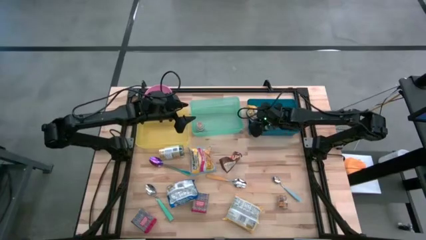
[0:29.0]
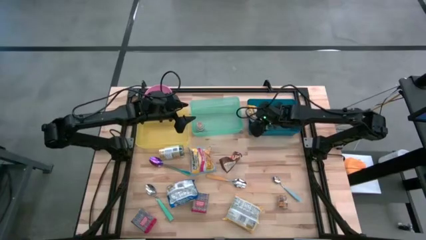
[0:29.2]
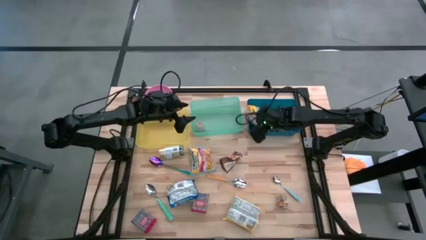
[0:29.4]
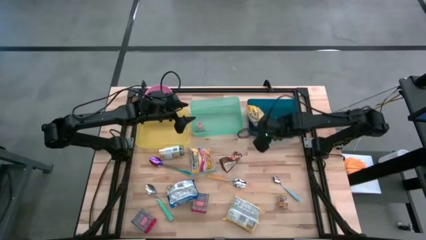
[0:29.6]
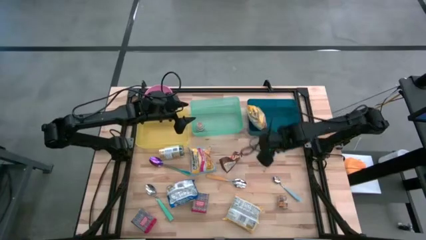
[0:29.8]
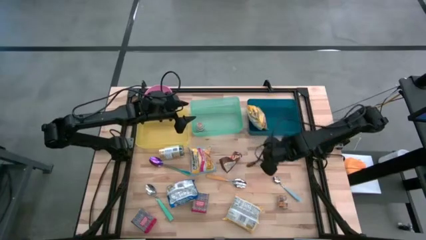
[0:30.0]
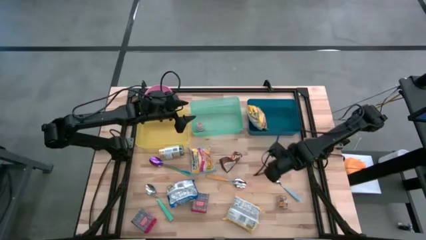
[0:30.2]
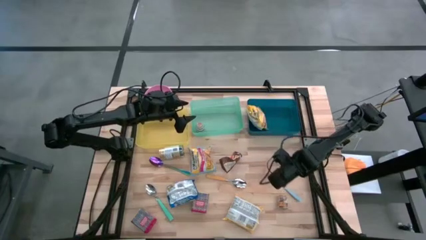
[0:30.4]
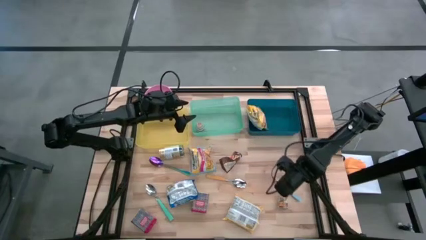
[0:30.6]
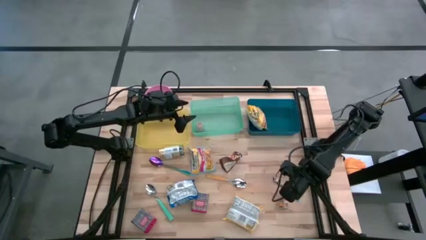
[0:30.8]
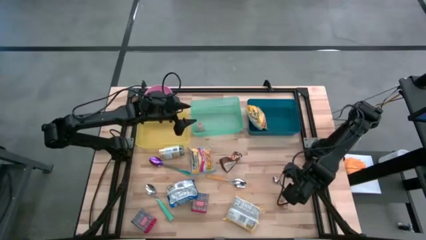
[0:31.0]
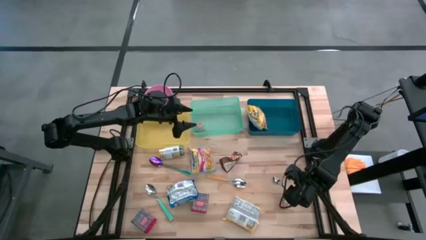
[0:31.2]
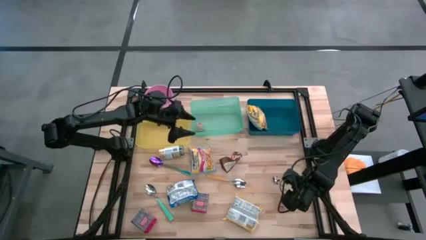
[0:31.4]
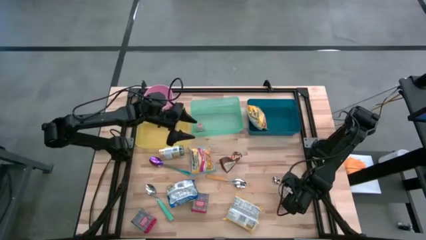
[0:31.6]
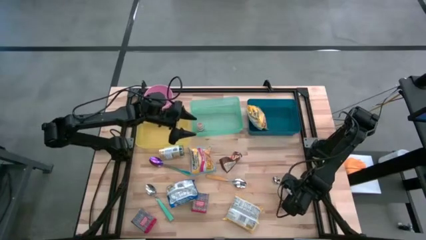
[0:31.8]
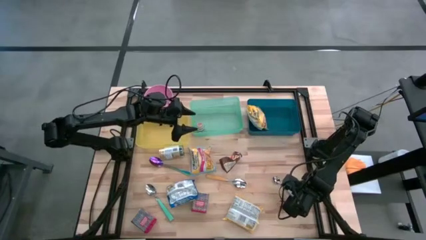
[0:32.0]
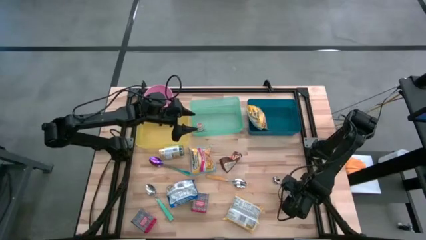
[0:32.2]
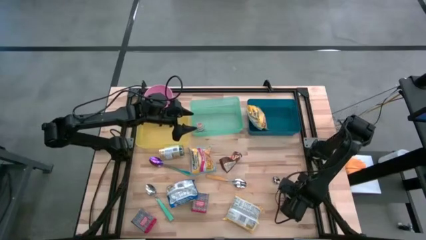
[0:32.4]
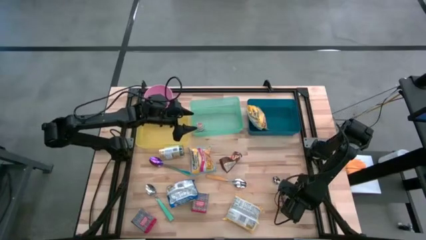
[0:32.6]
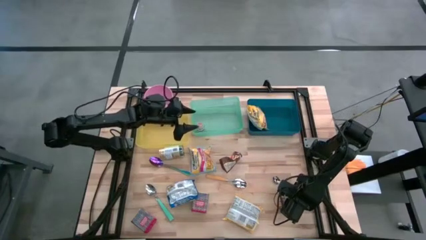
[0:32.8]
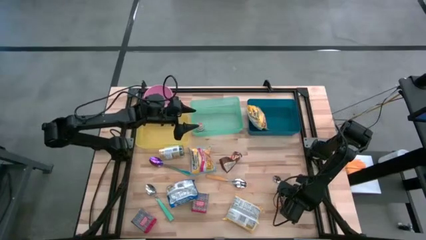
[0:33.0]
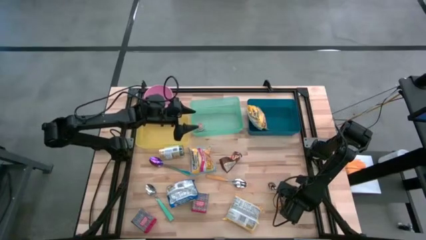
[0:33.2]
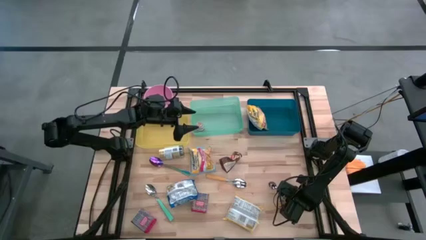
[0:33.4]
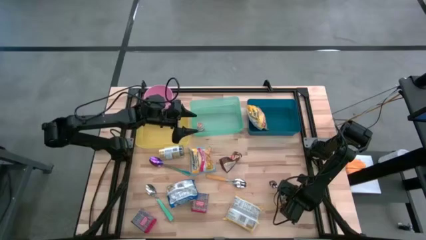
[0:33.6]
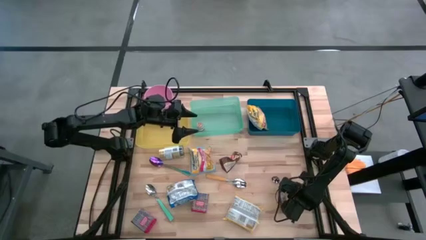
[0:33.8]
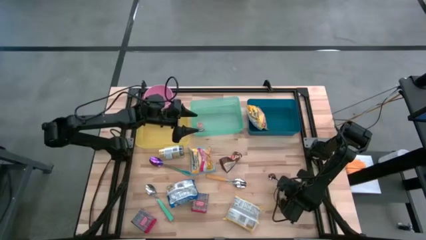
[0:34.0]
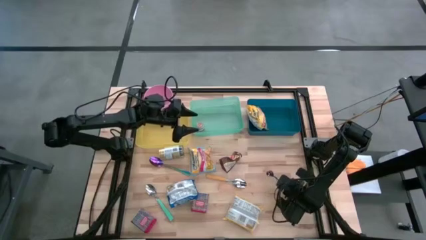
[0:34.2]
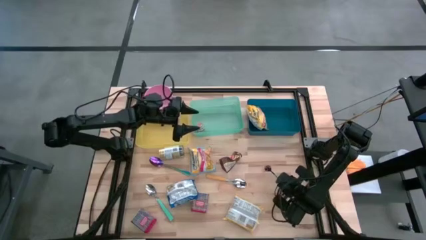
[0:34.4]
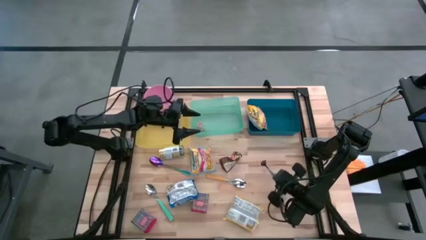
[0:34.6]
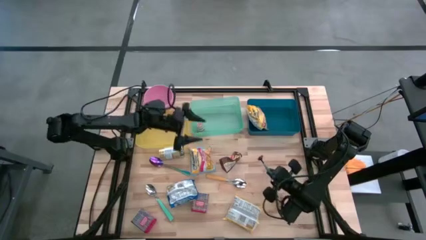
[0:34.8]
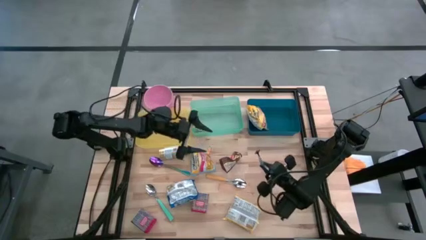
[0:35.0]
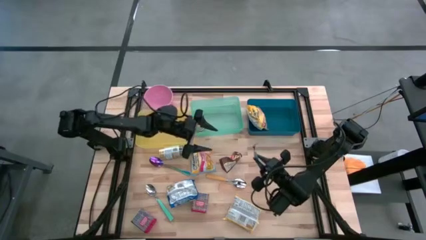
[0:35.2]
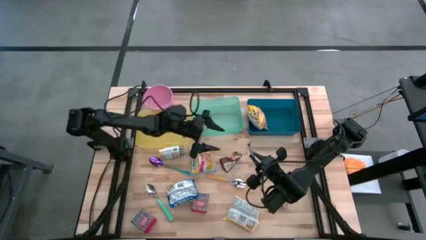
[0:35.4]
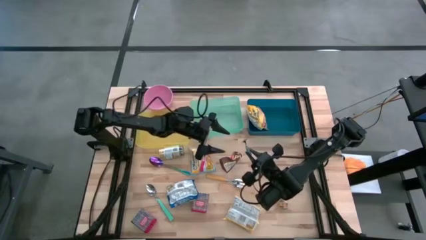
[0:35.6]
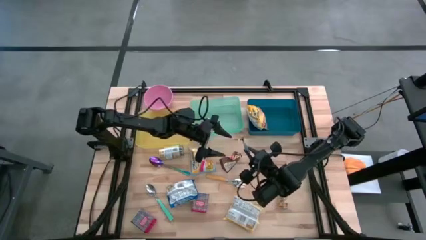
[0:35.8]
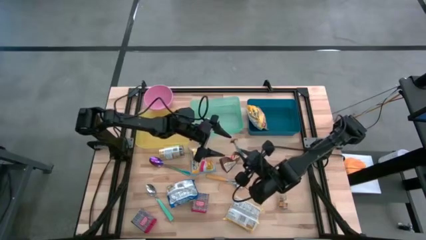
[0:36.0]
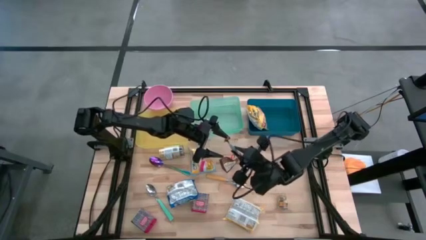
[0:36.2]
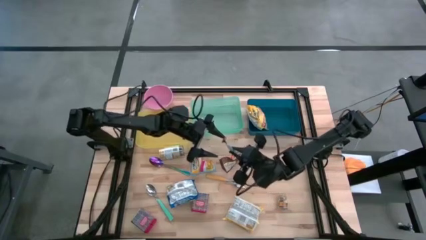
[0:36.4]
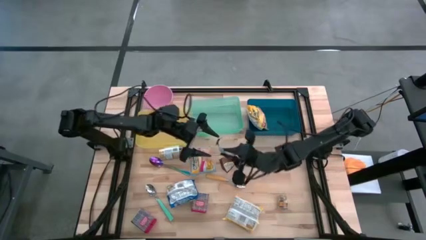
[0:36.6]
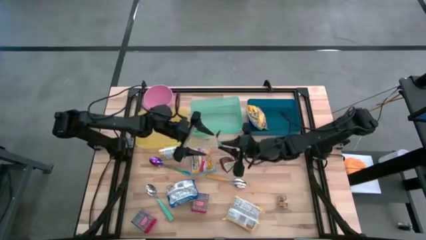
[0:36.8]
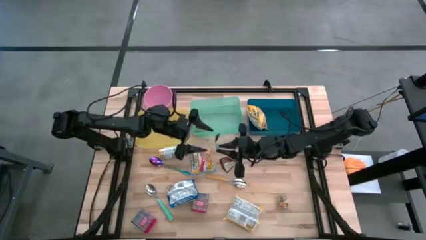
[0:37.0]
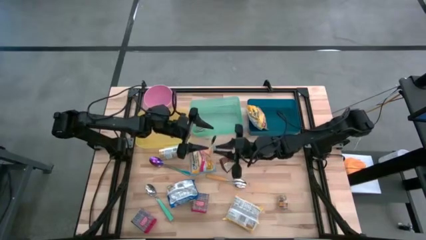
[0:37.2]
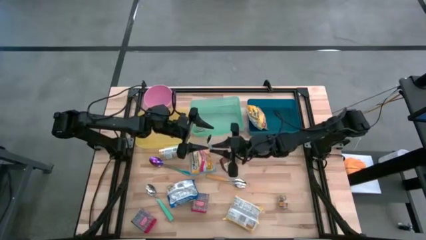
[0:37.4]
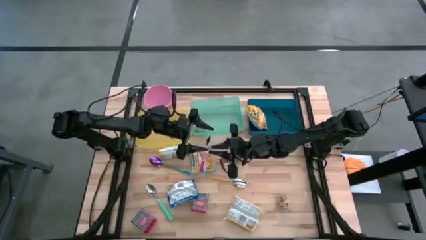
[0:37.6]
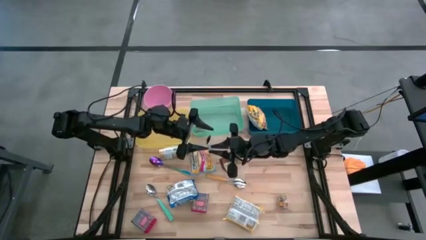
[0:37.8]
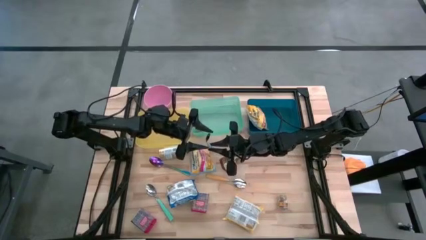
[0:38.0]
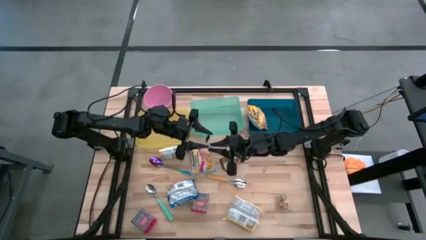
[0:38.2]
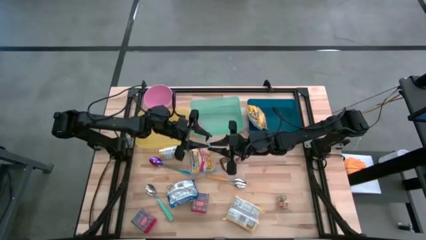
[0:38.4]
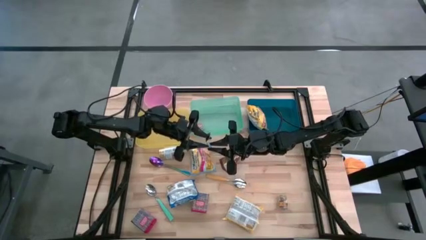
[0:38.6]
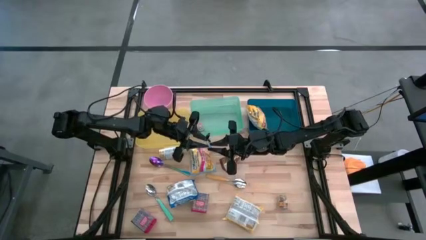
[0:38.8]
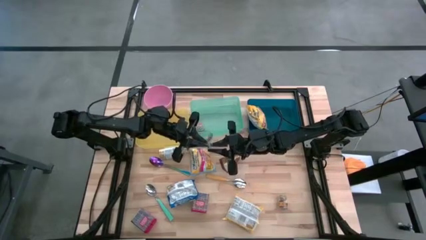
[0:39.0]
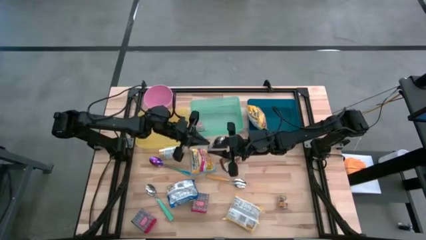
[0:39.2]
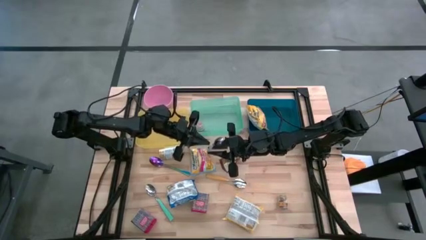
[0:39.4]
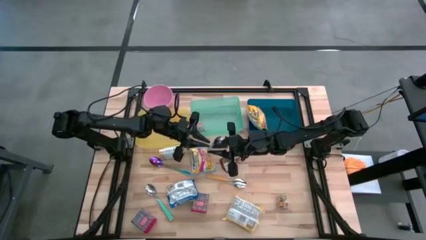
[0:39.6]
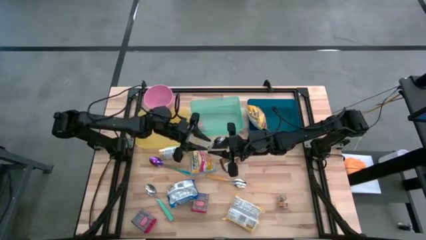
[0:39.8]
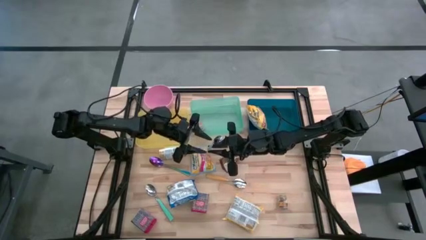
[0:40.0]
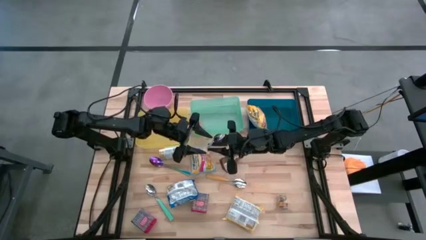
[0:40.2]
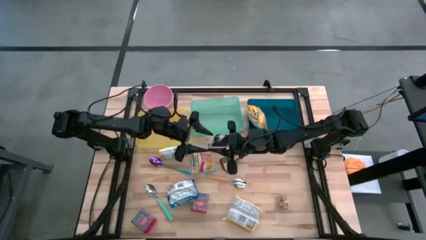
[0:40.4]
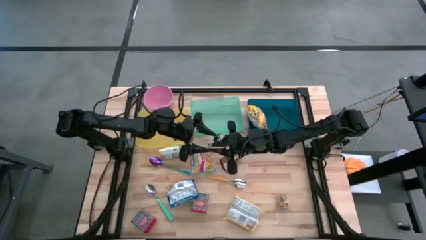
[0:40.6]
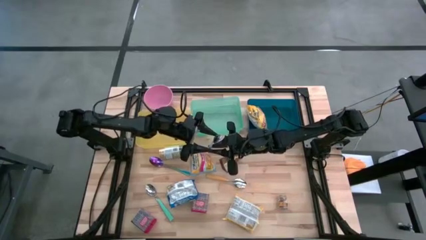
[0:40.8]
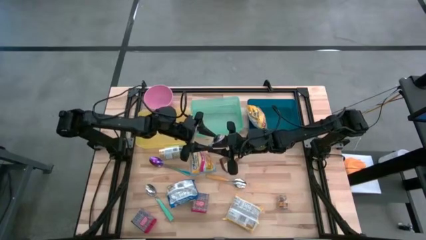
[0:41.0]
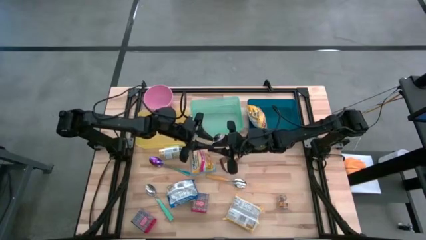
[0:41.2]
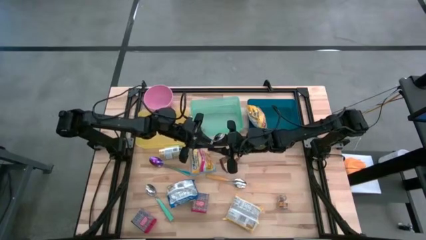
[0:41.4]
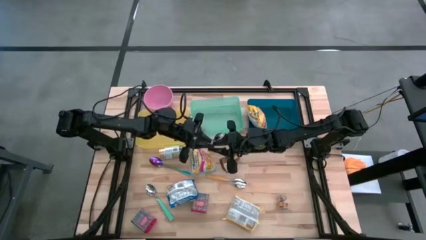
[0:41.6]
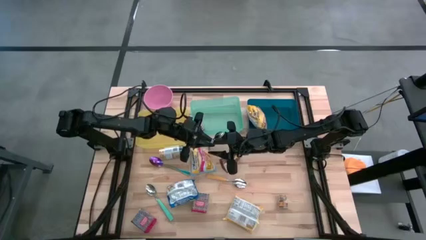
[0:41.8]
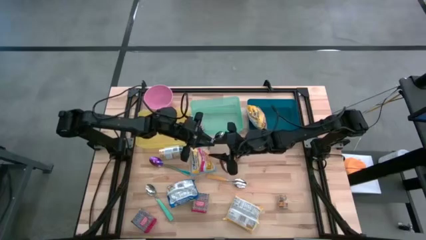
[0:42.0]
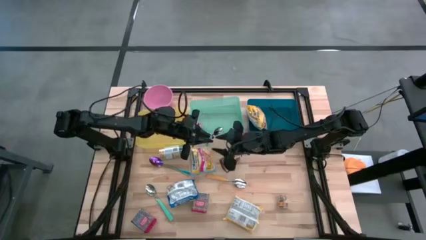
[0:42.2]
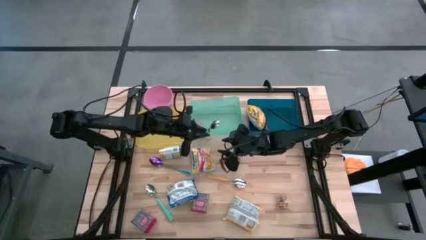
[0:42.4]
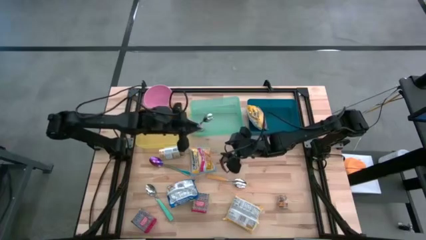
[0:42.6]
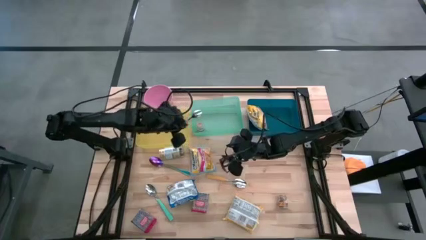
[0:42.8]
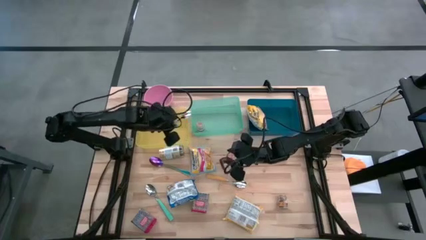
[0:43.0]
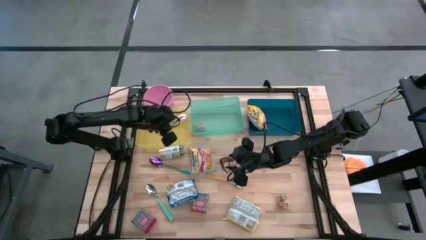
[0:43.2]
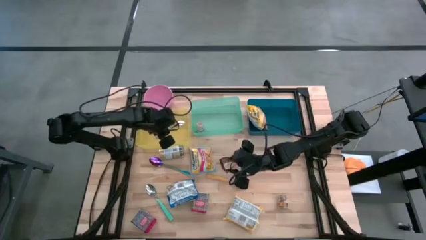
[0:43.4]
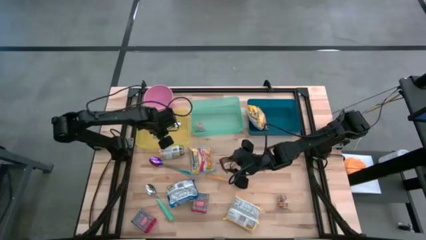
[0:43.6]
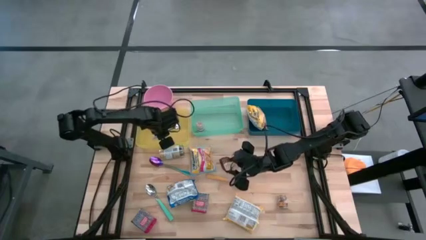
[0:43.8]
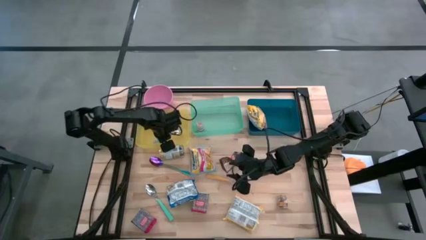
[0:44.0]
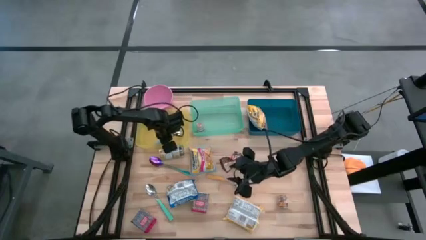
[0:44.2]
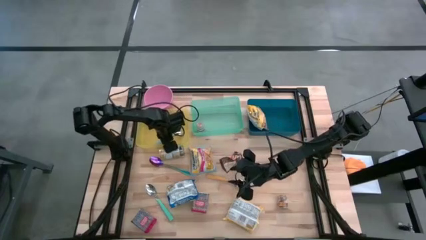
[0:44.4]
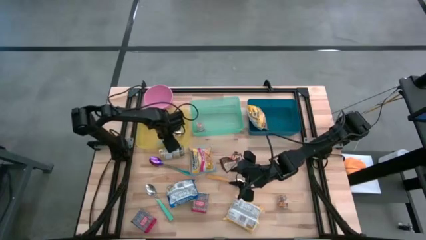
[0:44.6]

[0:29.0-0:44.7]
Put the light blue spoon into the yellow bin
